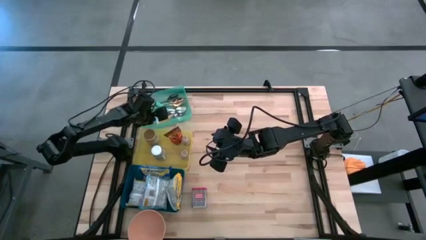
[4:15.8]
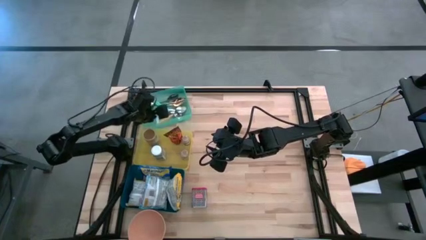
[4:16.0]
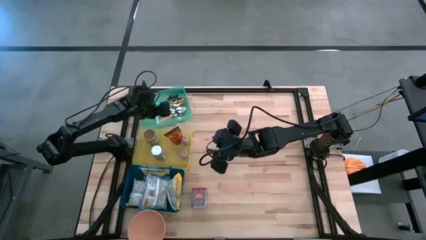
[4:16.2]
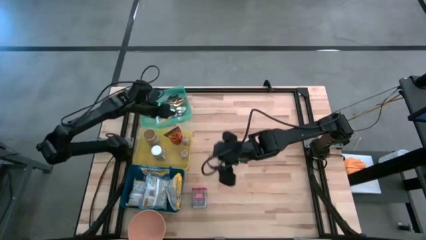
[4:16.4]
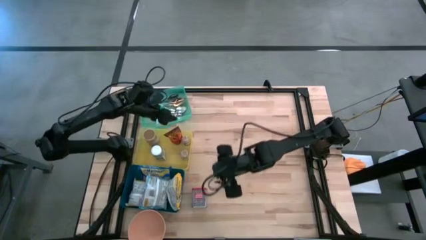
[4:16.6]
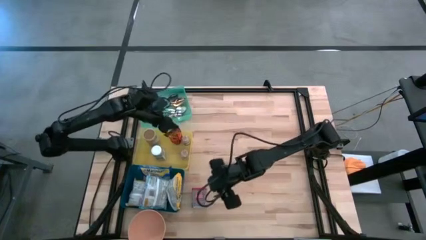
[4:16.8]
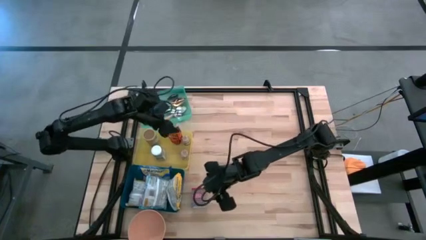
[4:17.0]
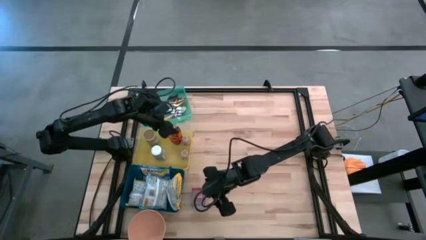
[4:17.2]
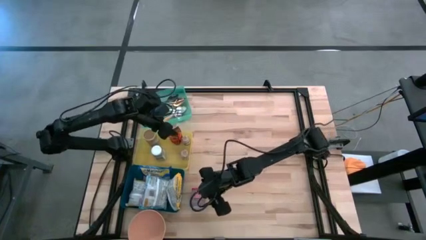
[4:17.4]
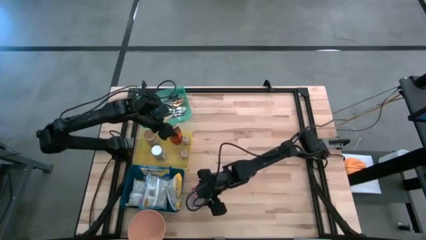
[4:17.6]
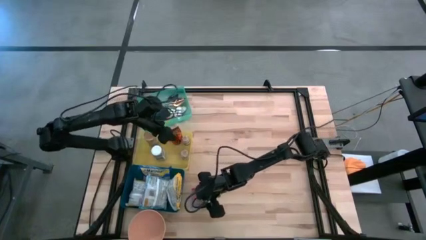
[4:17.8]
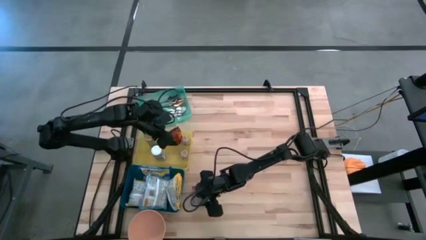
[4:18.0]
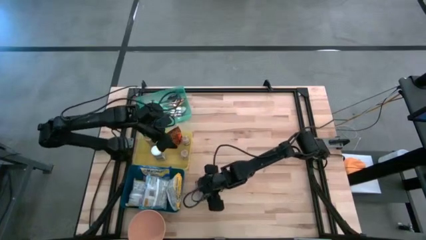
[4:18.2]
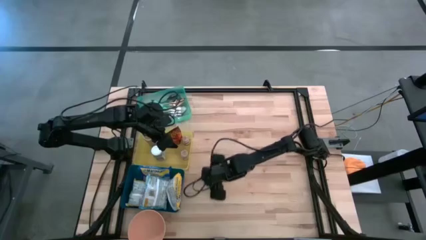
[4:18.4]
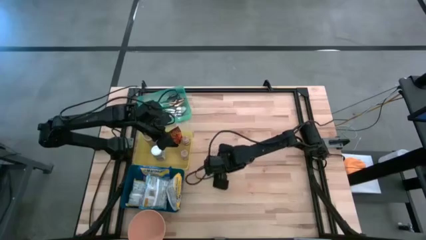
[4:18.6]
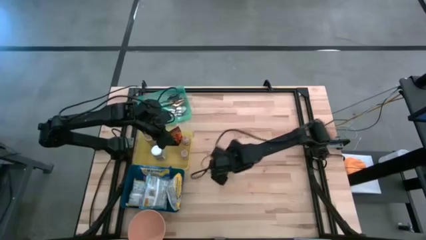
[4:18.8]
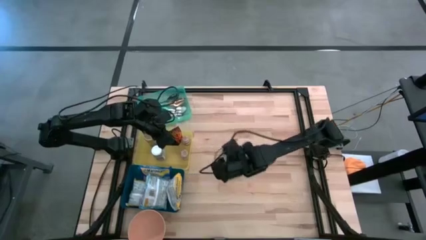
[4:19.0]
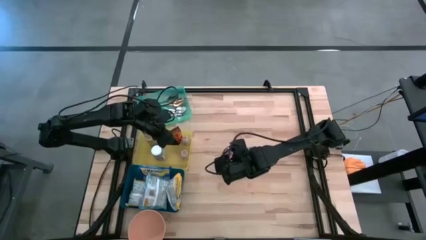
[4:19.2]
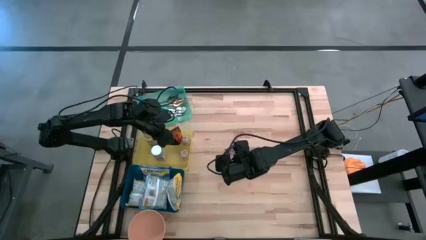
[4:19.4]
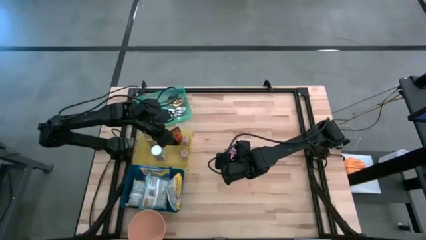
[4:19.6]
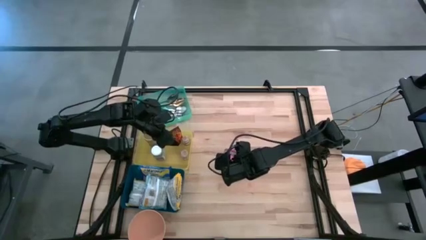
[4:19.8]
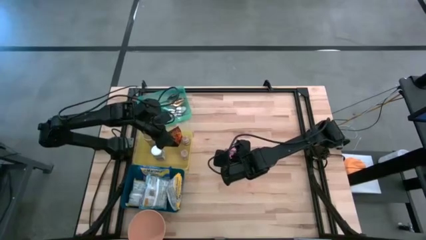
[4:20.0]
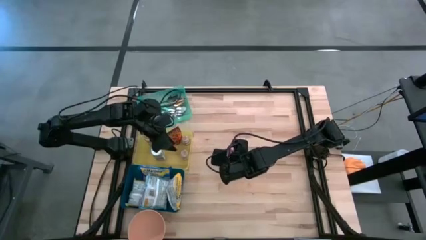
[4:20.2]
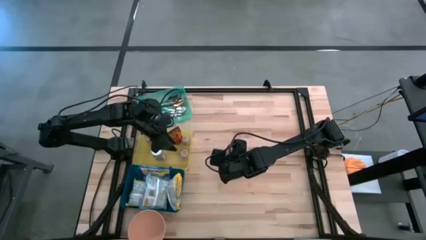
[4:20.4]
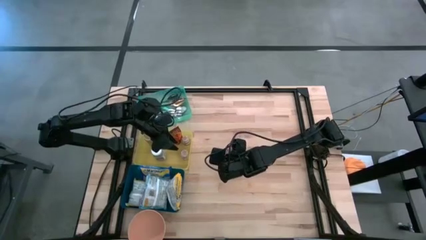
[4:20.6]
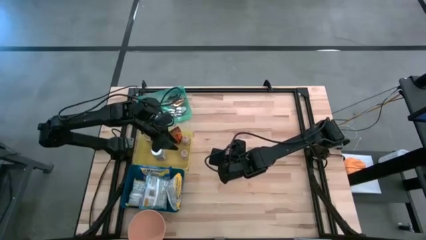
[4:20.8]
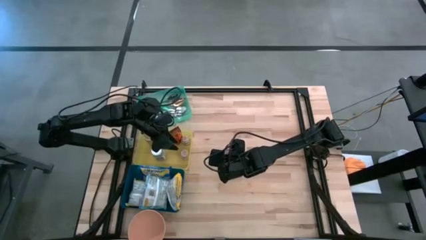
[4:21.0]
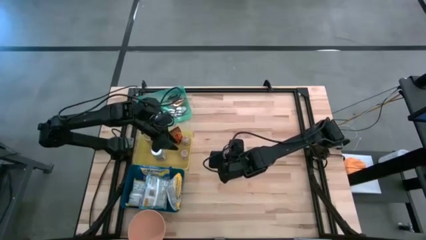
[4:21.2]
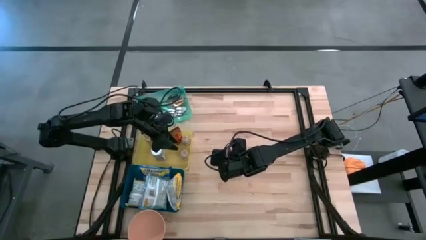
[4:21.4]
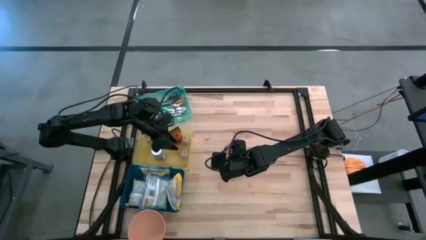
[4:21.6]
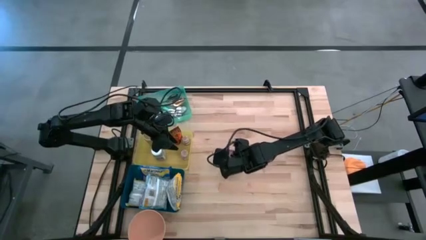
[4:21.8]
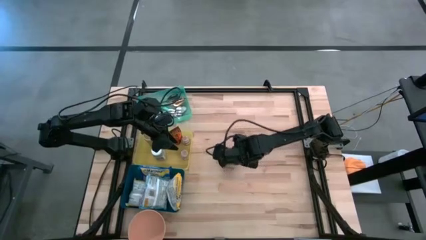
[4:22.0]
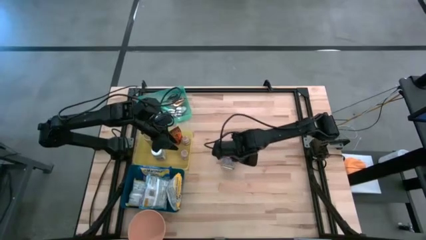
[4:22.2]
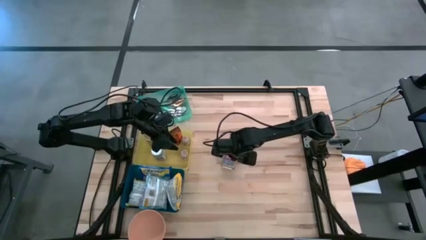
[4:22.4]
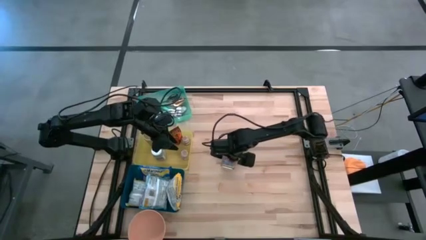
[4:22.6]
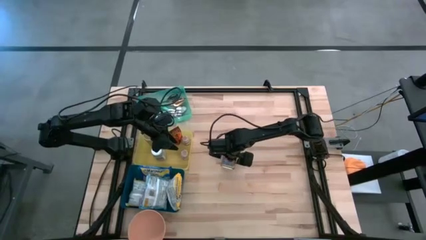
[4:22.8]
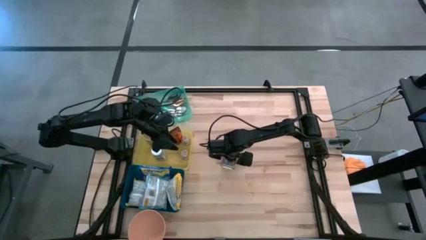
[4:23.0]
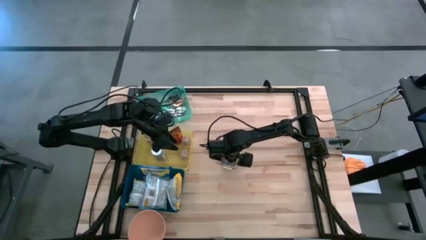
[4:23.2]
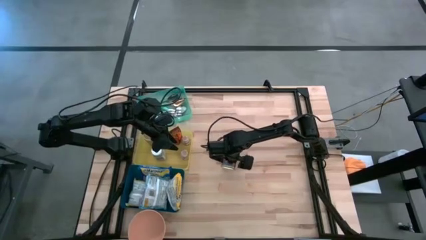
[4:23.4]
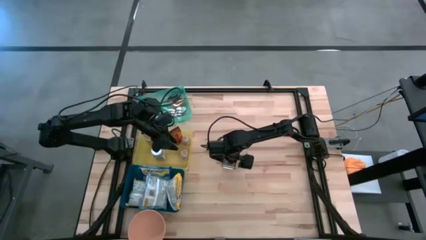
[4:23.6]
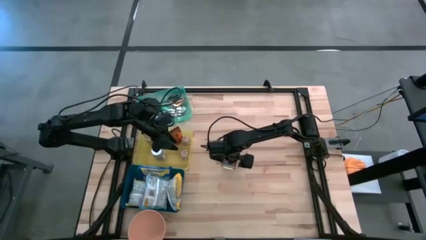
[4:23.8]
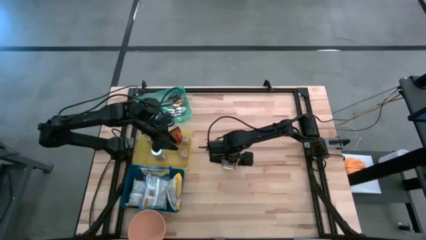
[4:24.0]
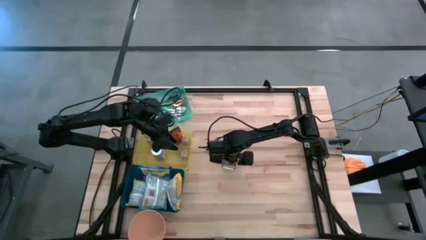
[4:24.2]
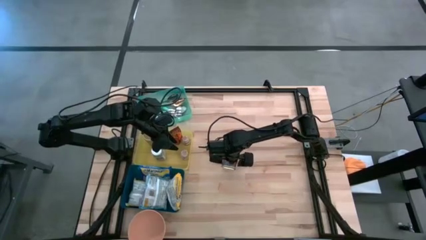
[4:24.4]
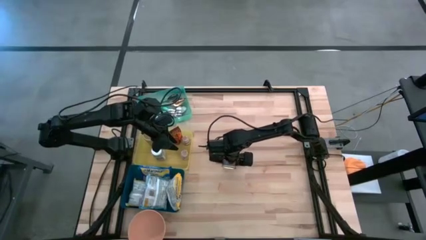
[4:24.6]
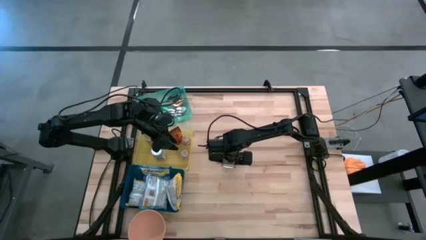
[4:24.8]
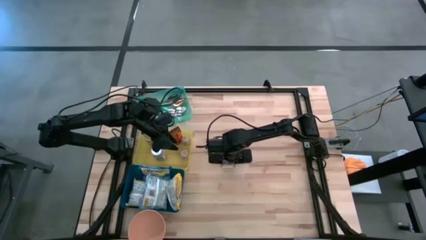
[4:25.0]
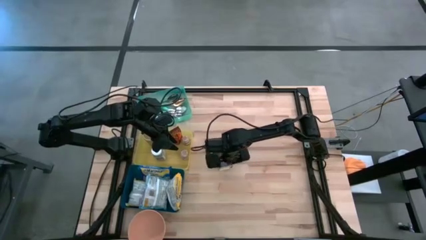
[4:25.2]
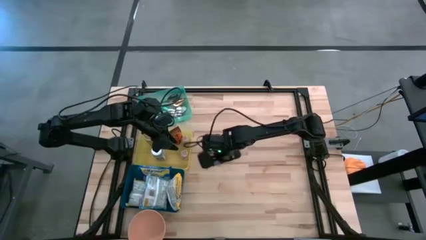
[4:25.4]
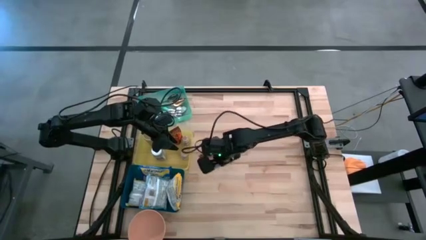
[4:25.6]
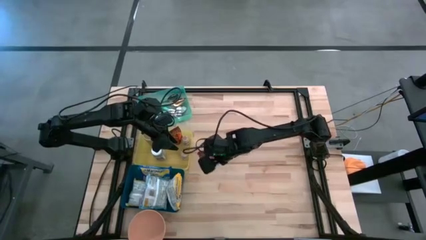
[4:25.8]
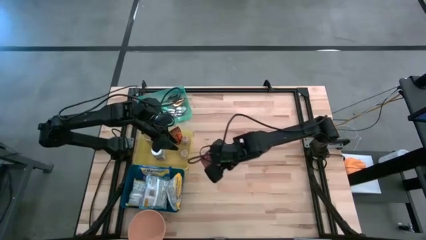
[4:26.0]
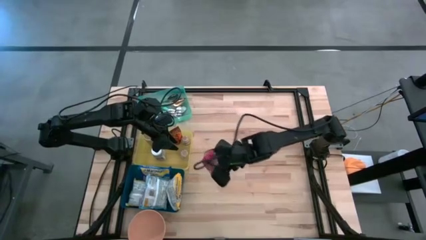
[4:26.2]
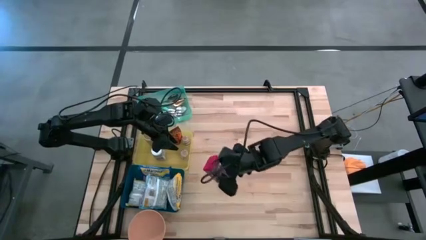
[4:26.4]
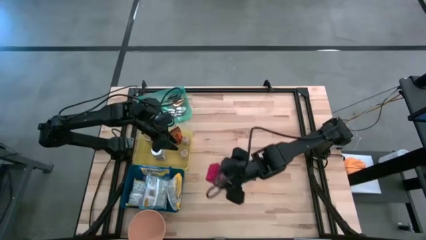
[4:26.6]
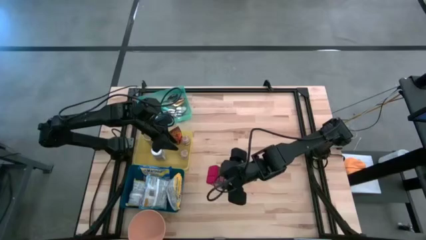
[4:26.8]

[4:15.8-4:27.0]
Put the red seasoning can into the yellow bin
